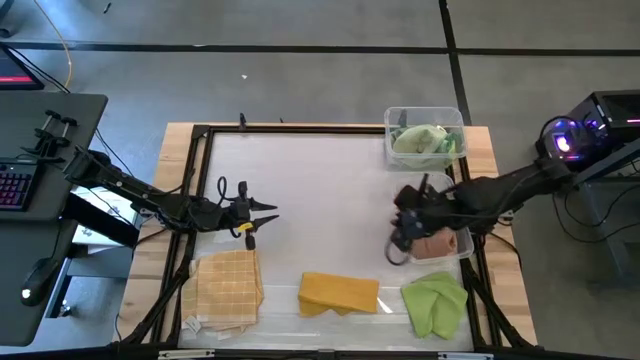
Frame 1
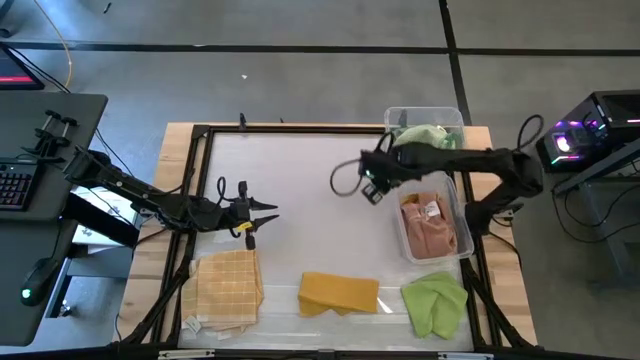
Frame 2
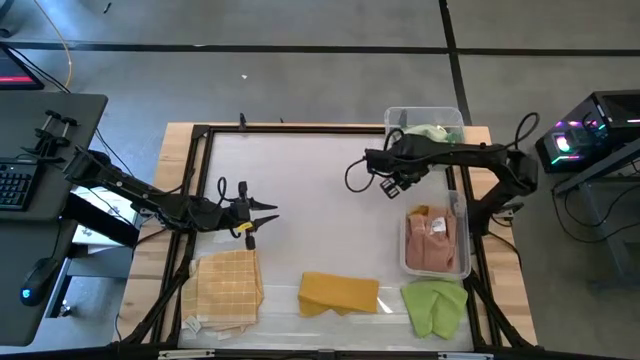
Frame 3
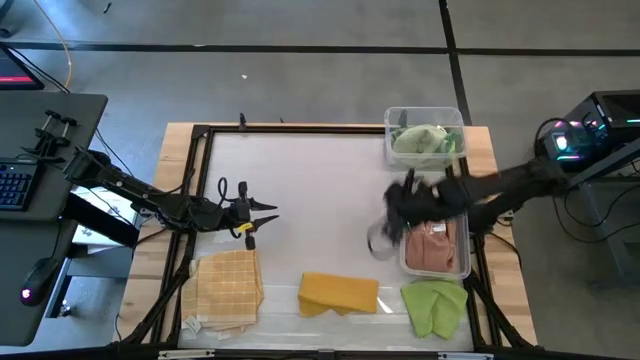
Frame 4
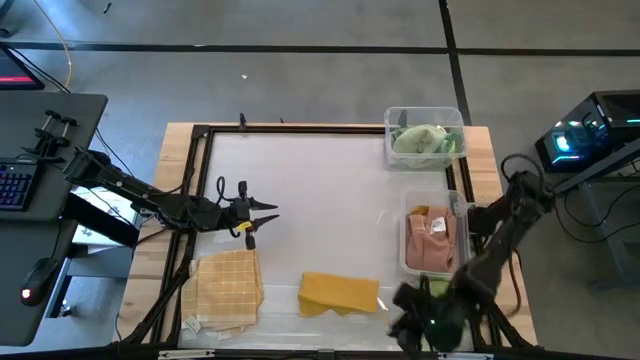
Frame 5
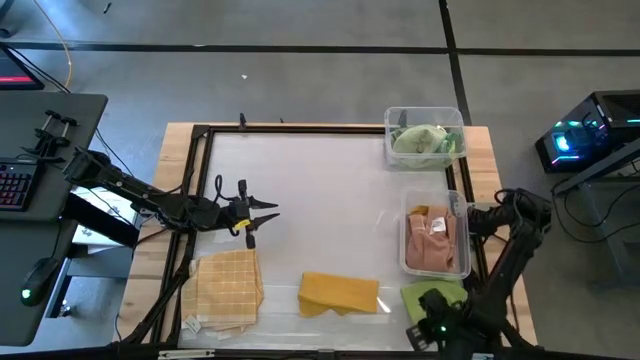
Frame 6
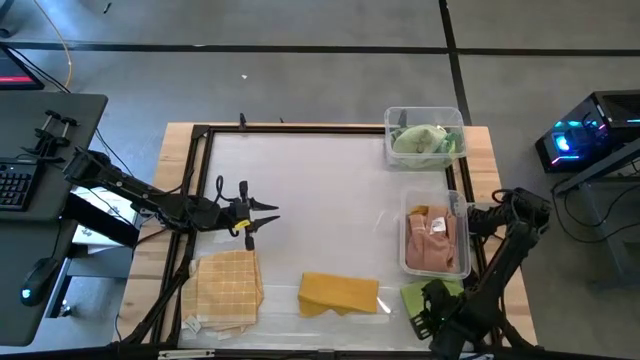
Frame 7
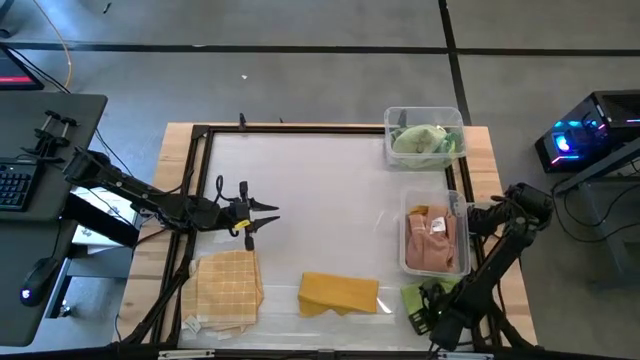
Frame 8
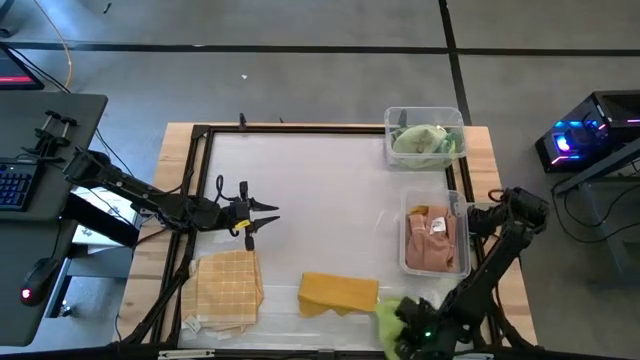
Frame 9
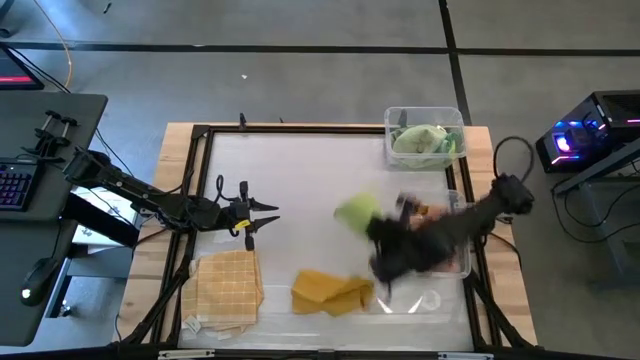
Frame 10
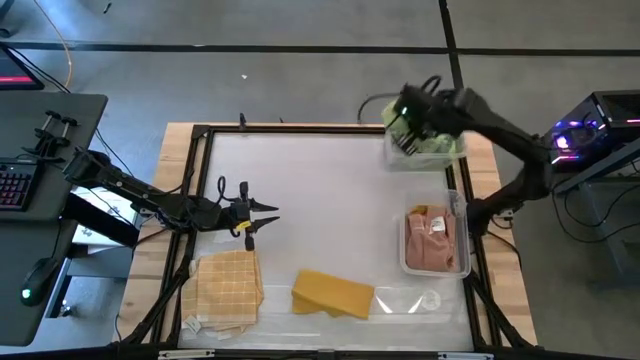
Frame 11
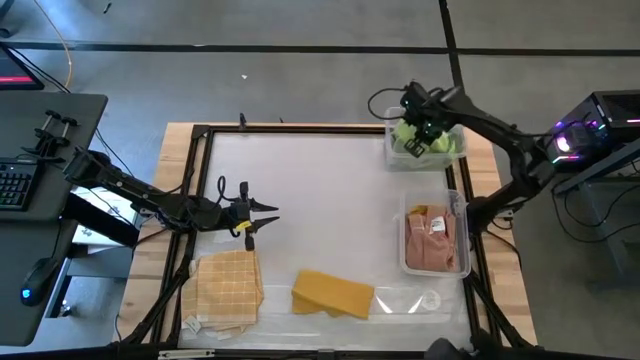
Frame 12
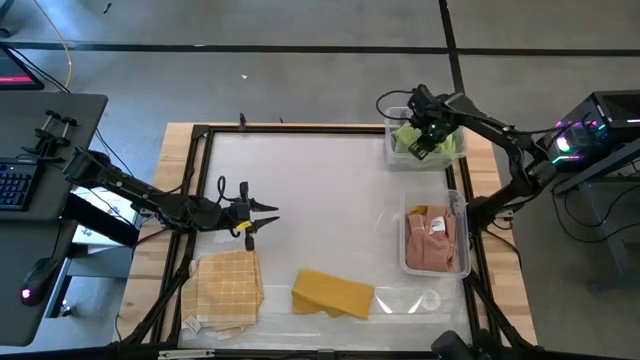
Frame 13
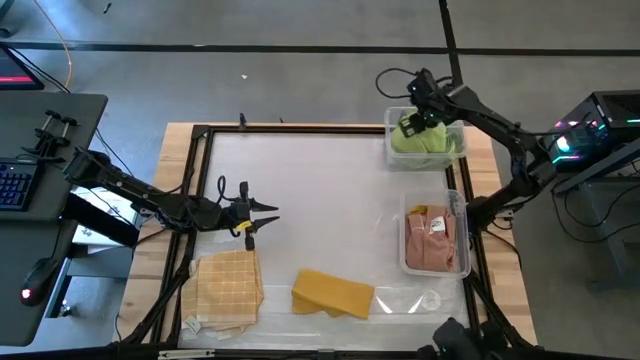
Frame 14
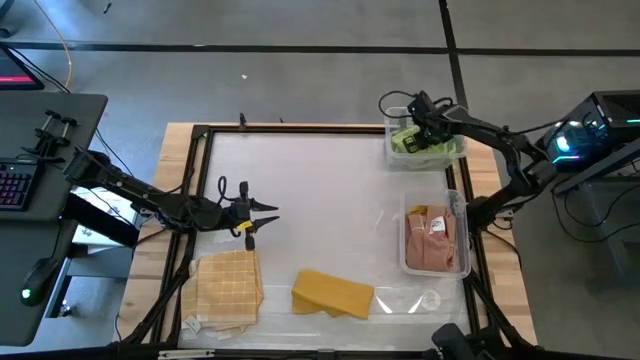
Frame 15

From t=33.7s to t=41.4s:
Task: Sort towels by color in basket
Put the light green microfiber towel into the top transparent bin

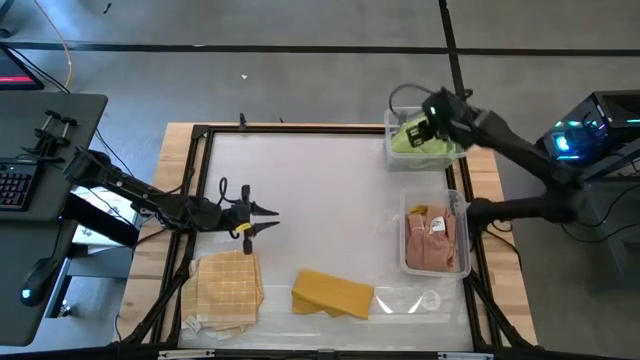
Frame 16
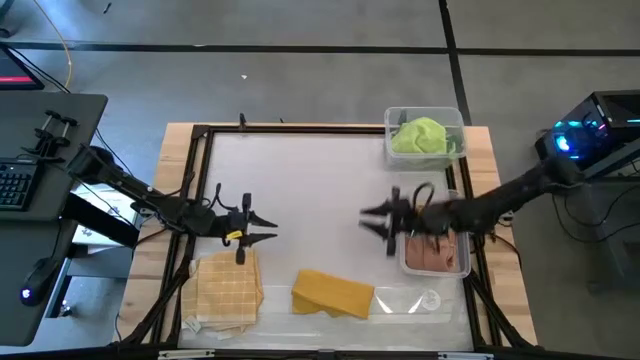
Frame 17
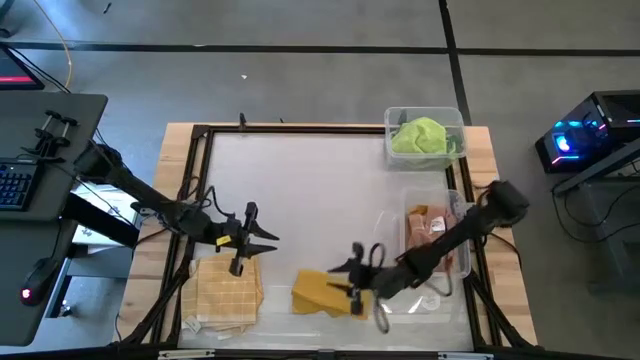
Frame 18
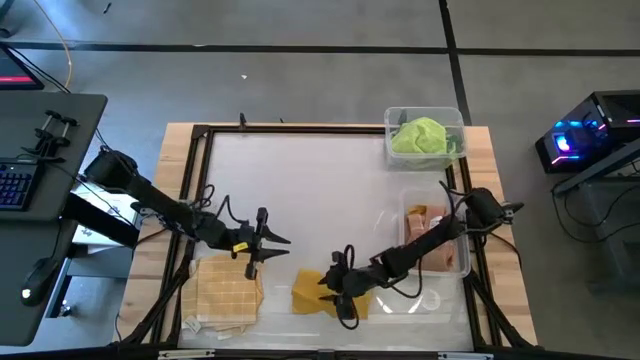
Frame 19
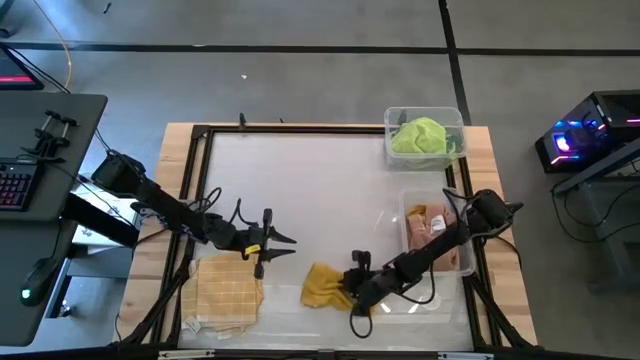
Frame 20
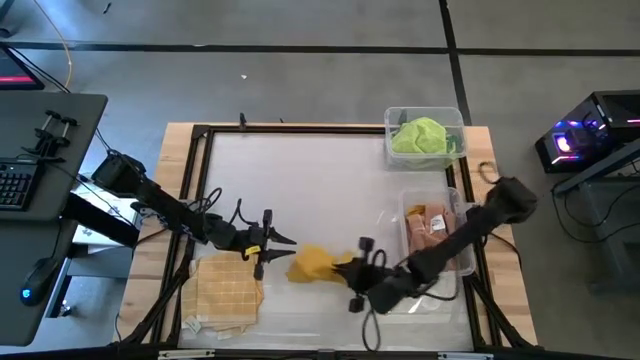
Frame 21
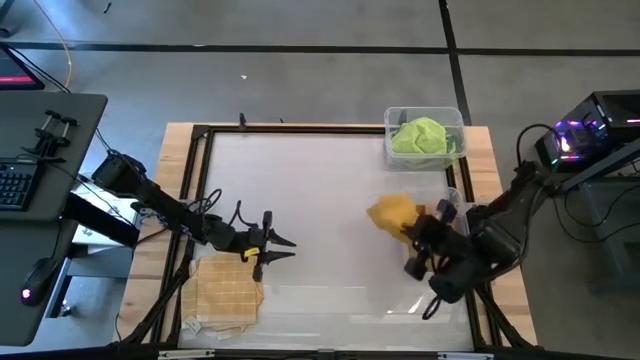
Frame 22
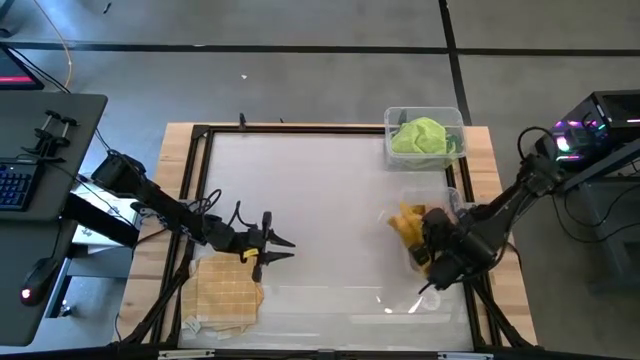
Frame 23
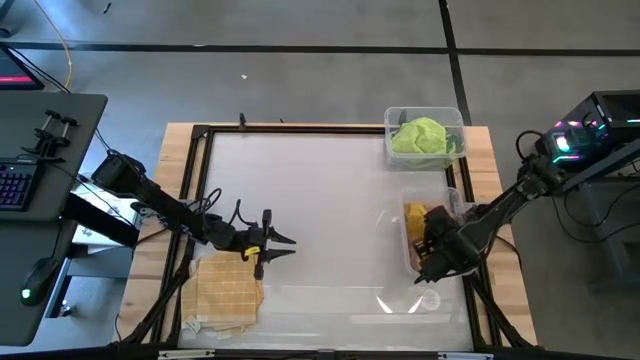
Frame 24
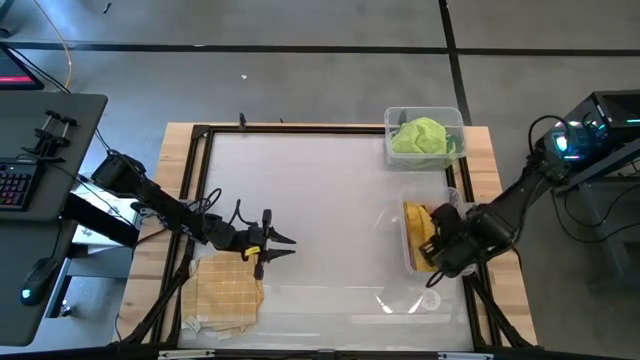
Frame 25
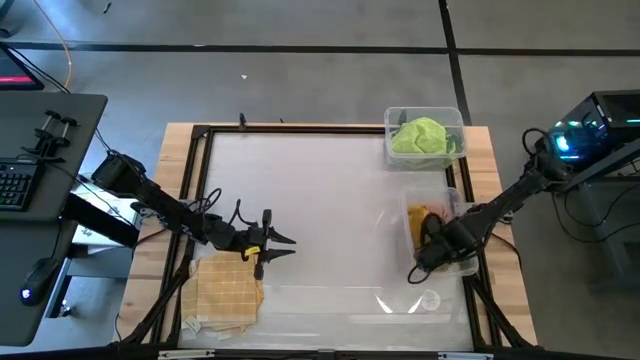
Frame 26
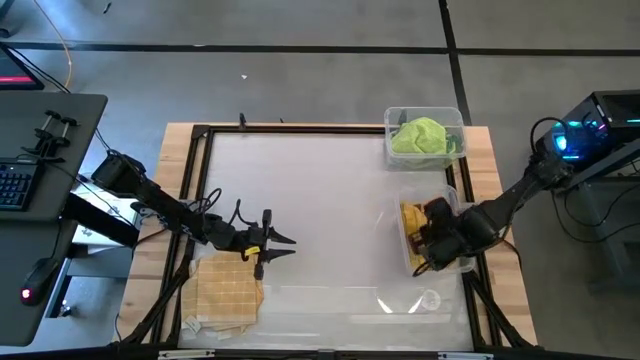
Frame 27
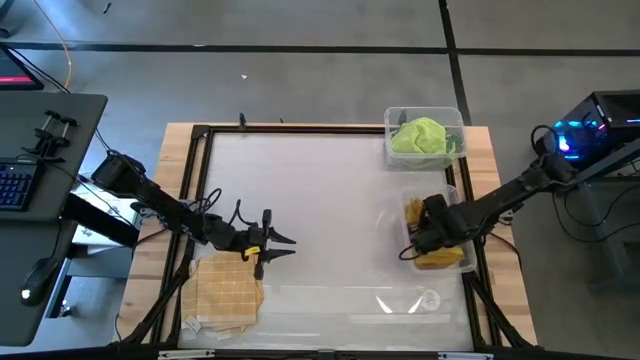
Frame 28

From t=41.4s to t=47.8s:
Put the yellow kitchen towel into the bottom transparent bin

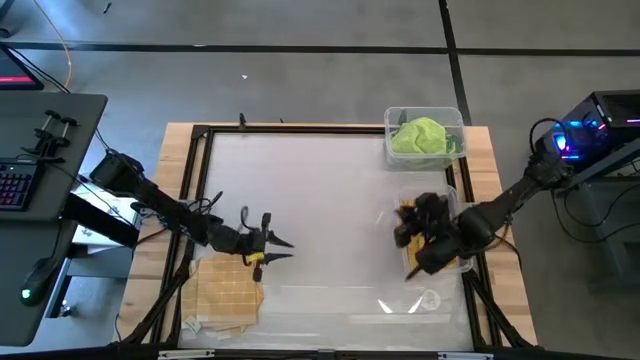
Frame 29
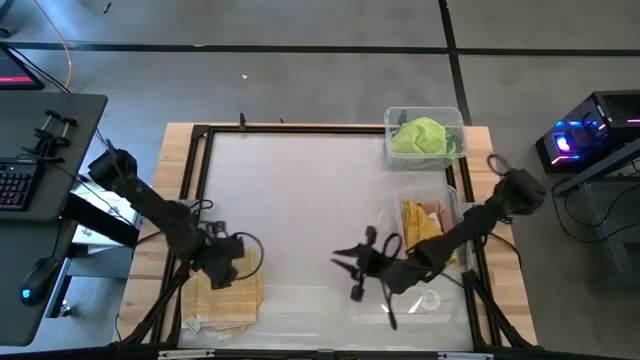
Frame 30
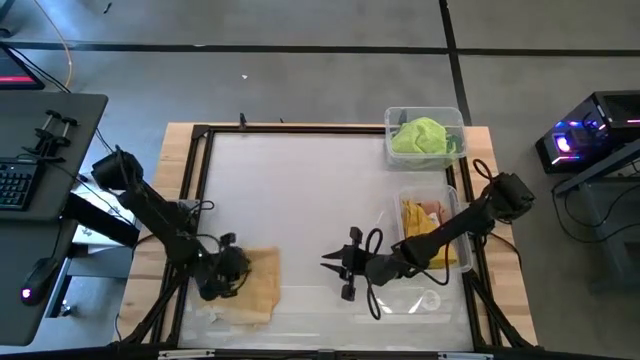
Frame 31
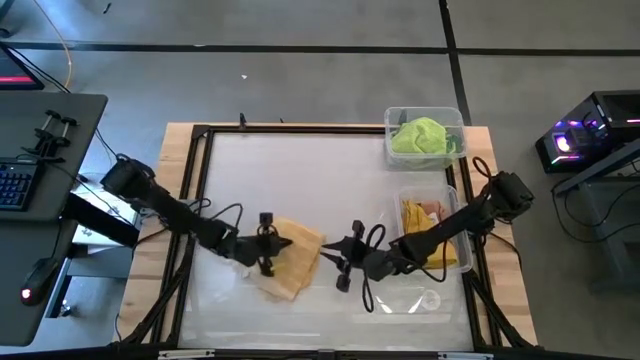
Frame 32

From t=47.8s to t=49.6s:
Put the light yellow kitchen towel into the bottom transparent bin

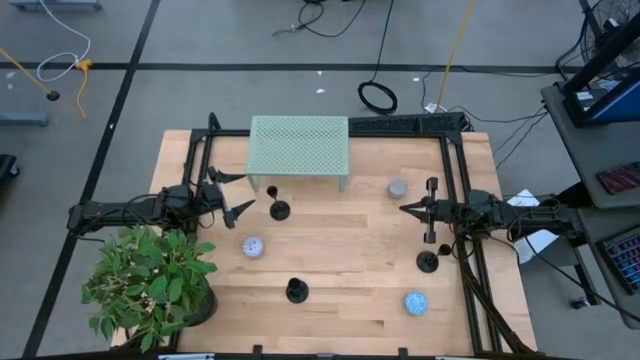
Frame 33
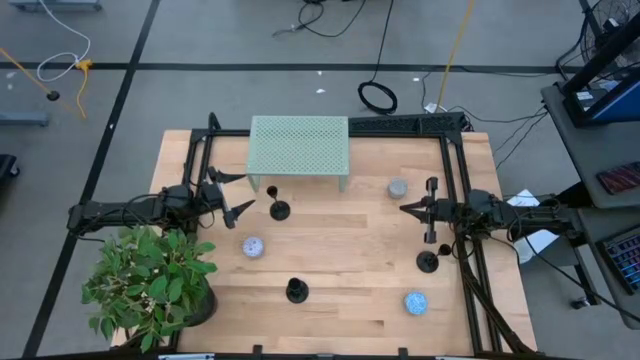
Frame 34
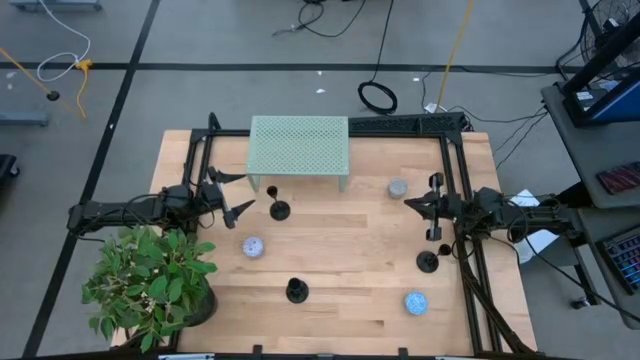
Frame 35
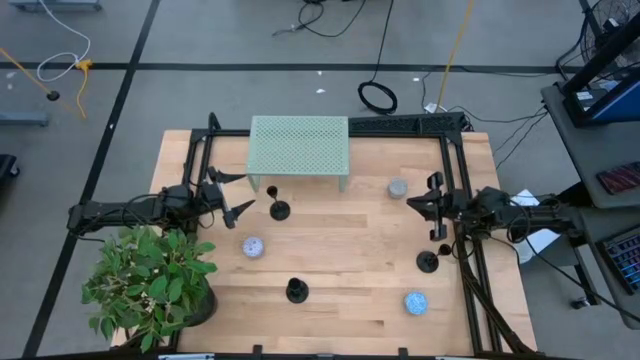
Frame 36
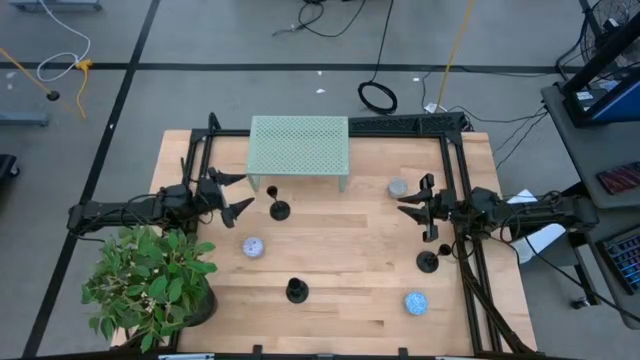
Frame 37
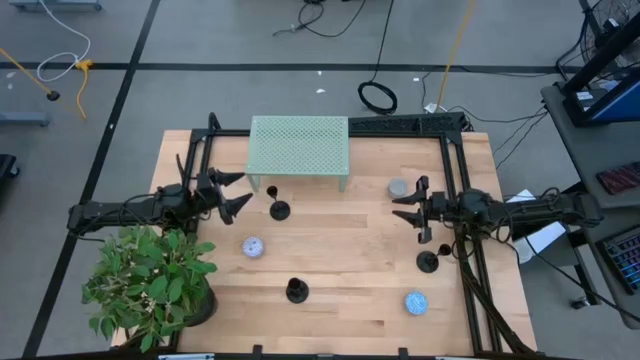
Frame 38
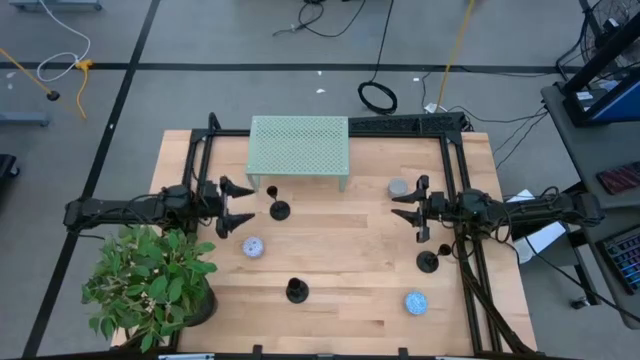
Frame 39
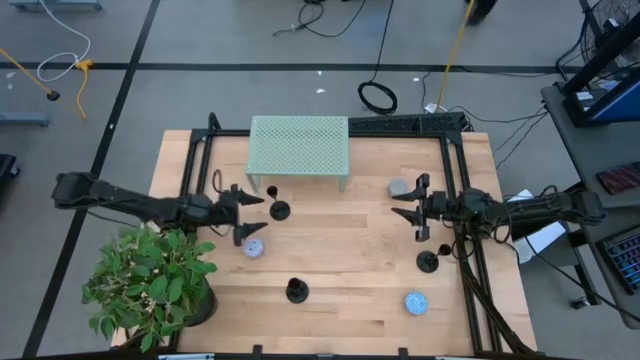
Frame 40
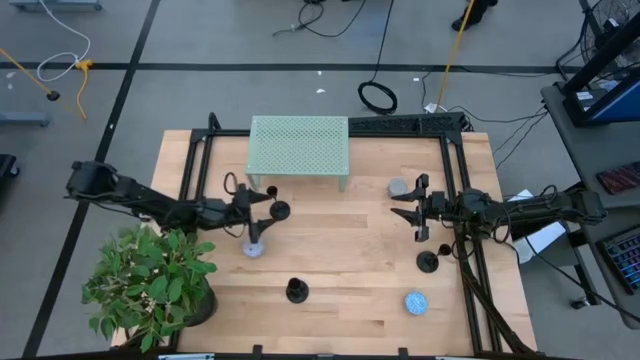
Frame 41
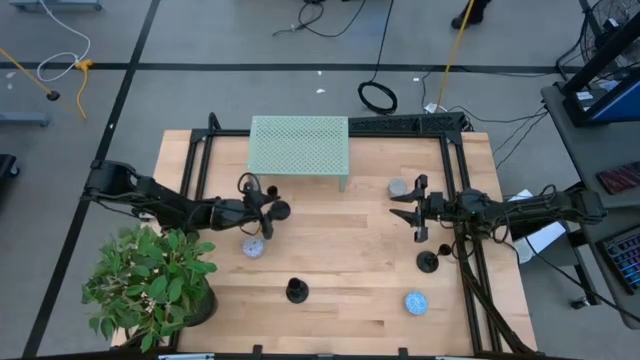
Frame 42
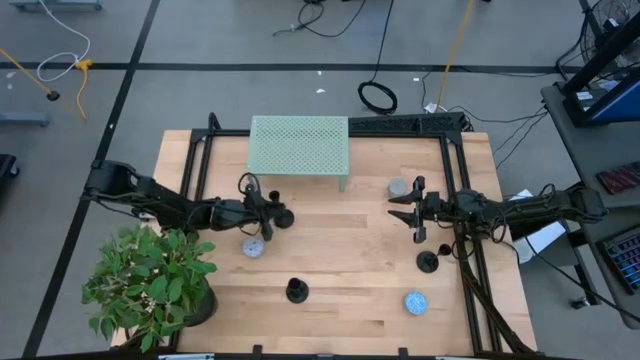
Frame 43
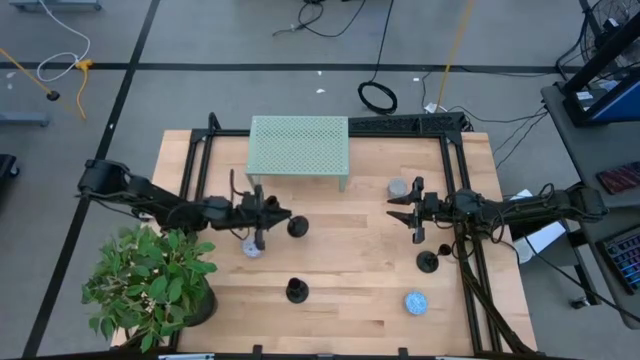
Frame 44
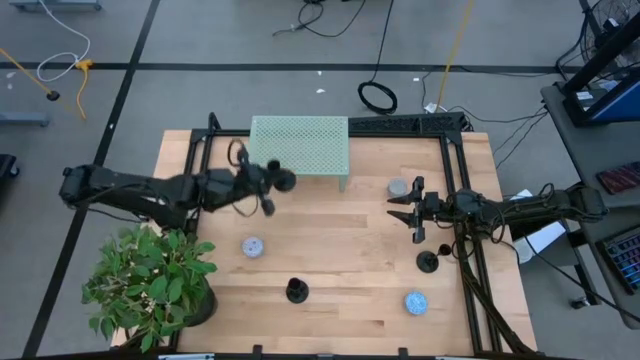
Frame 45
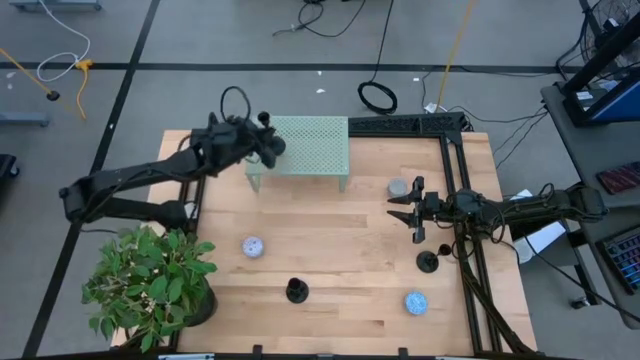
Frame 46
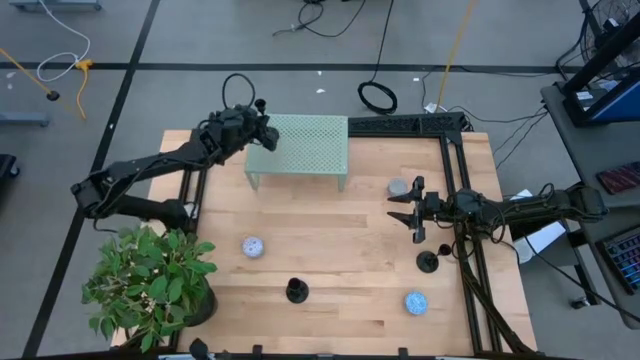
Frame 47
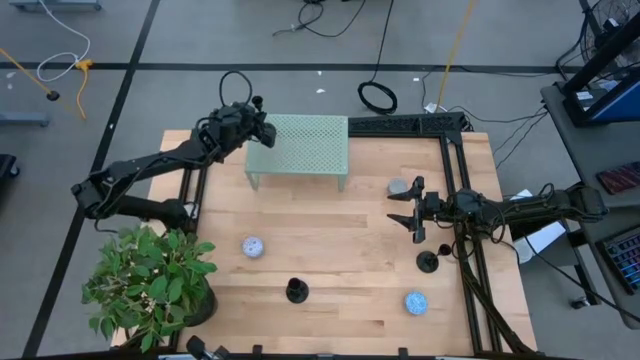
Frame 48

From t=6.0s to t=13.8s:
Task: Pick & Place candle stick holders
Put the top black candle holder on the shelf
